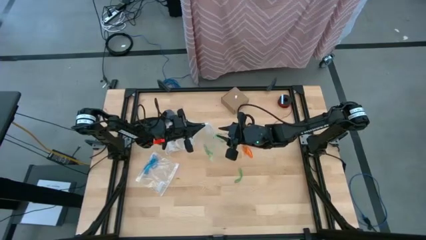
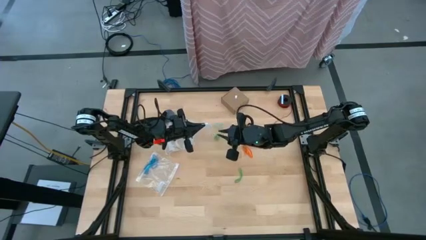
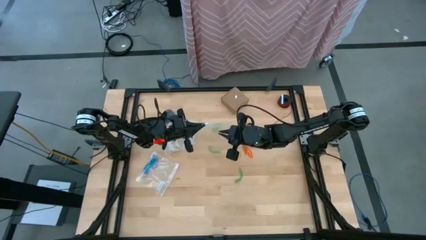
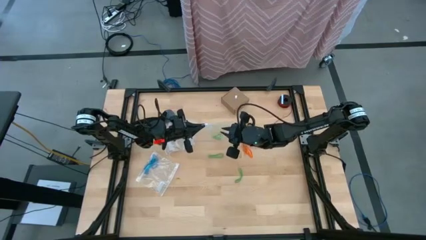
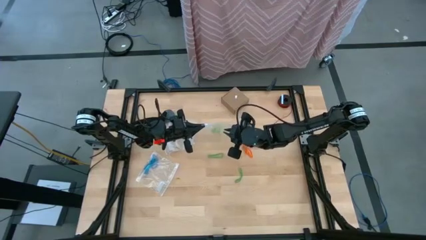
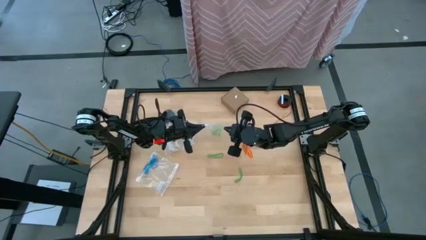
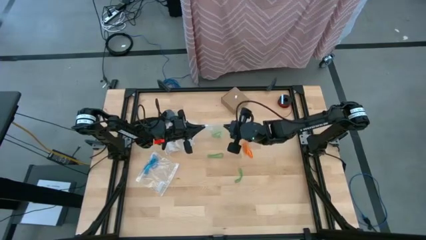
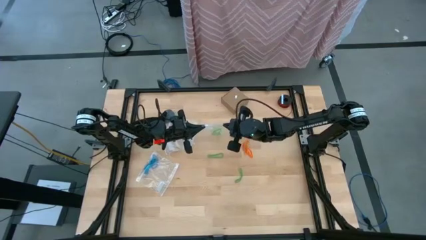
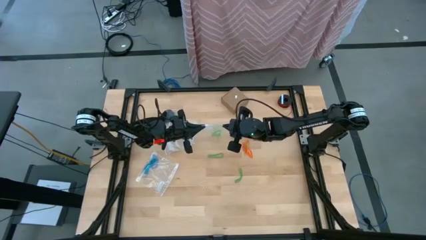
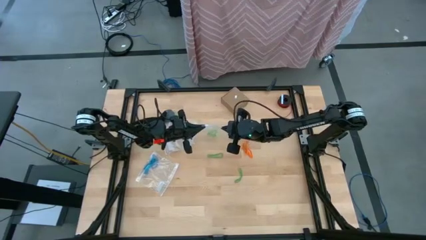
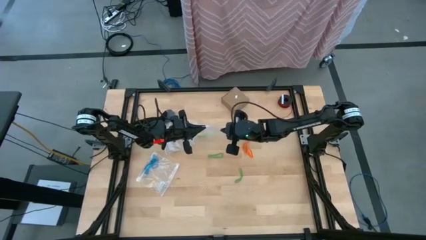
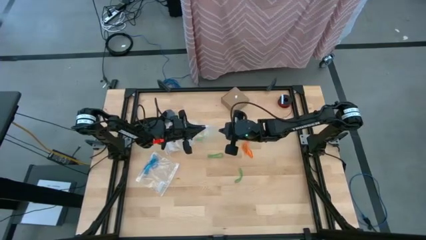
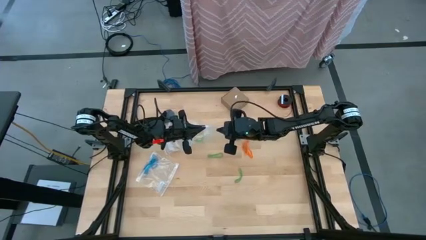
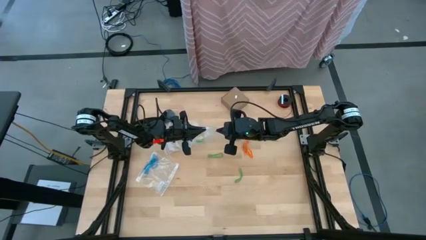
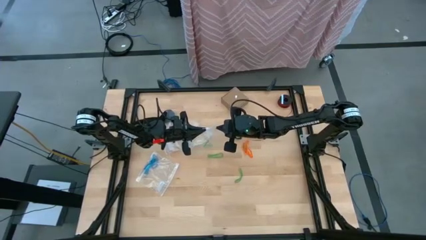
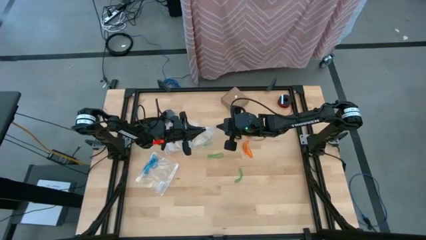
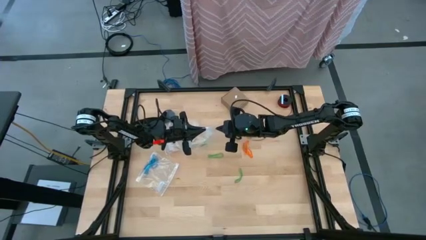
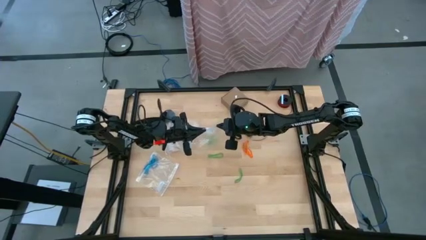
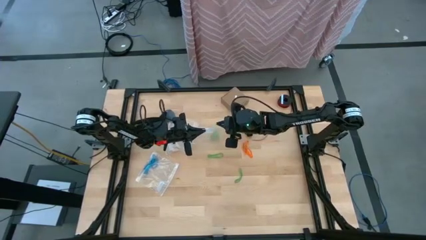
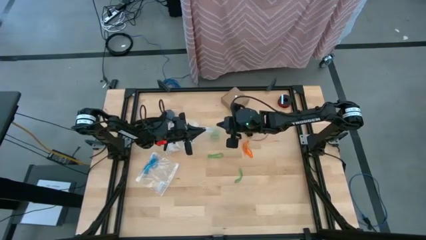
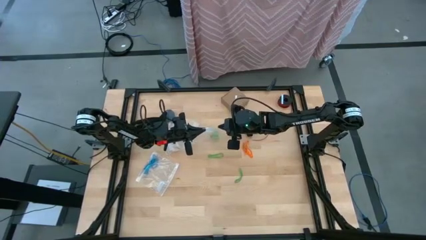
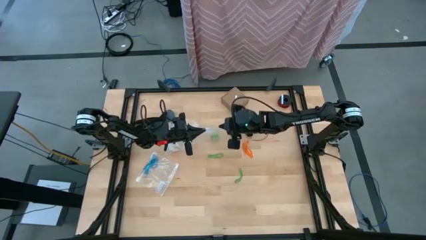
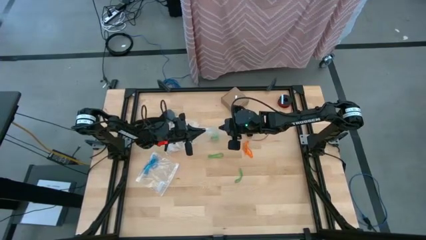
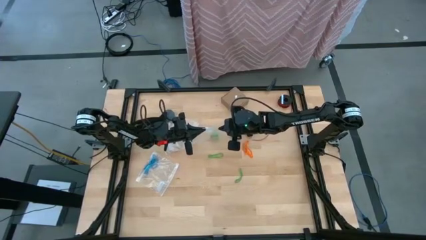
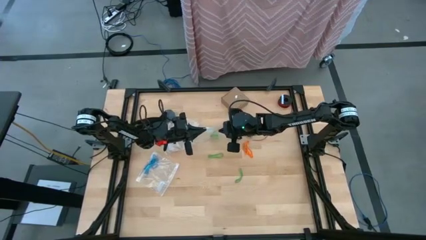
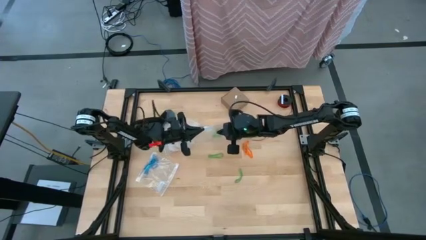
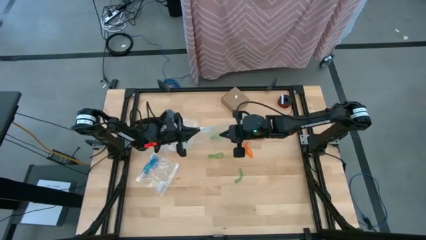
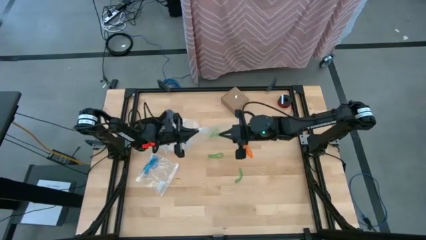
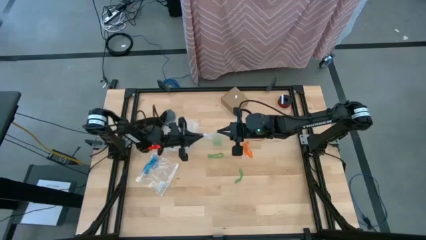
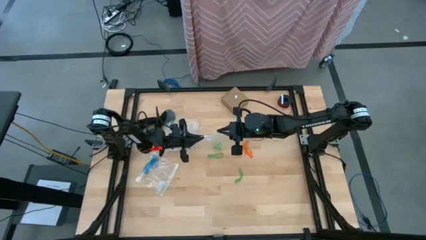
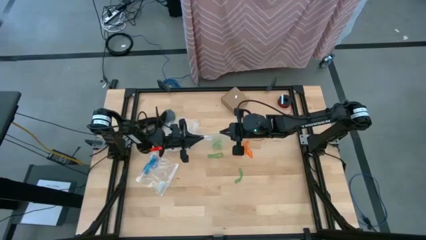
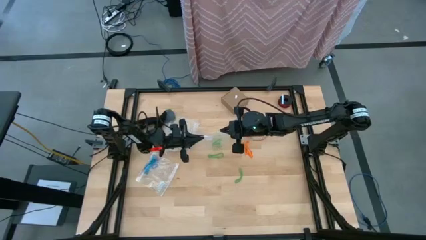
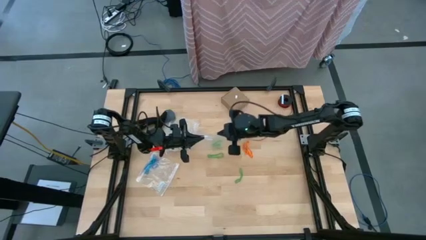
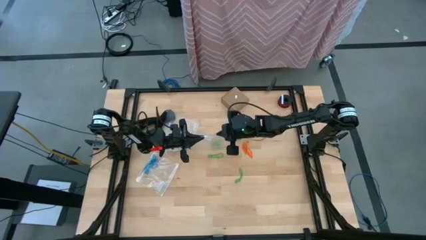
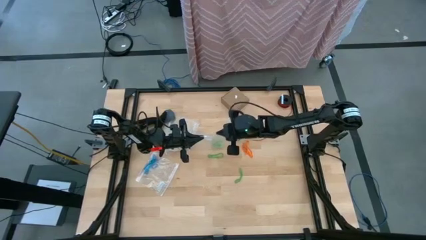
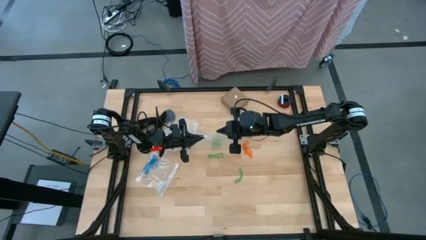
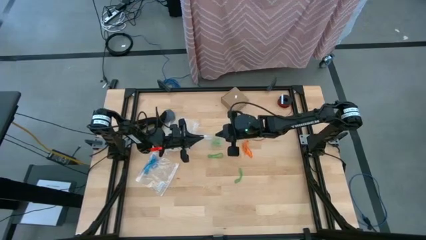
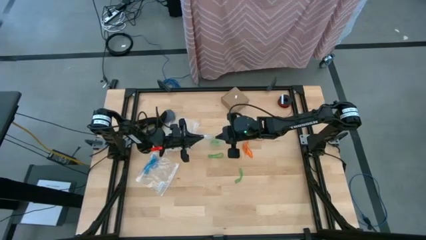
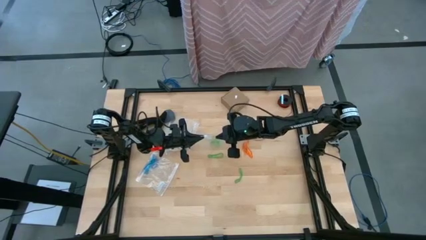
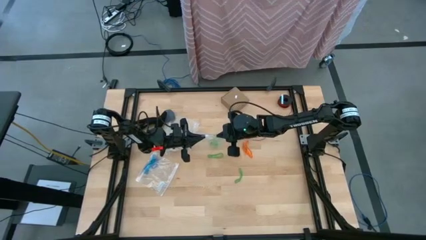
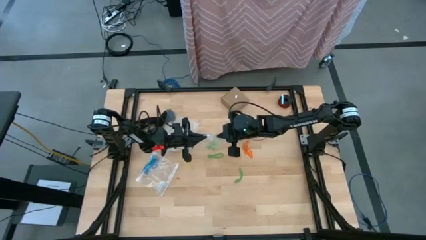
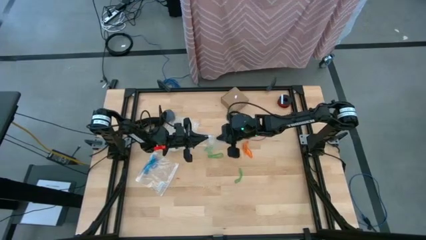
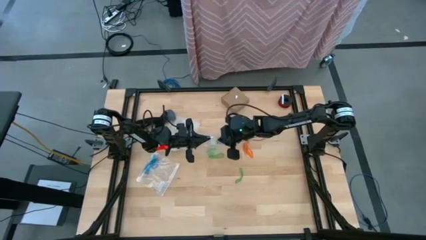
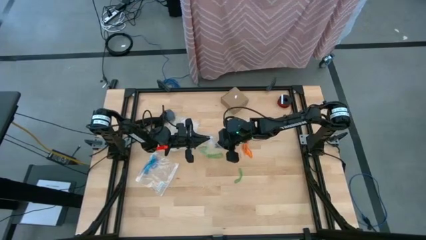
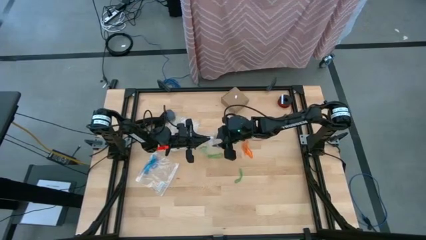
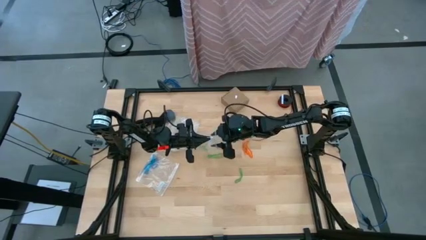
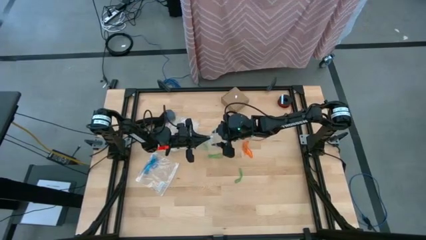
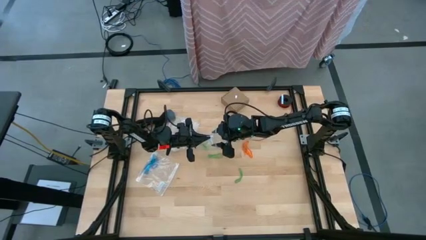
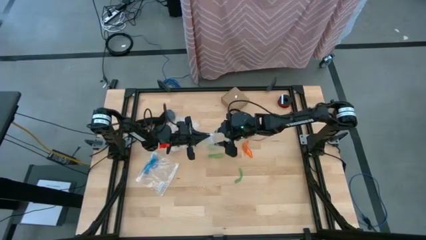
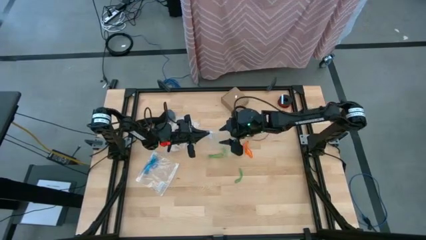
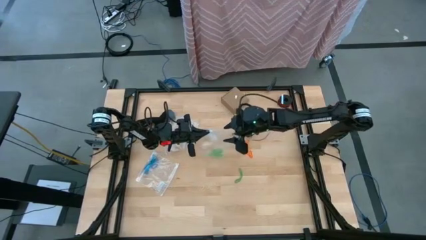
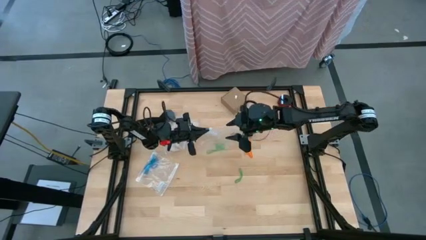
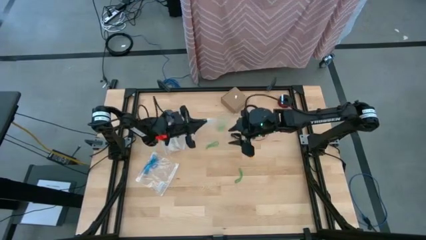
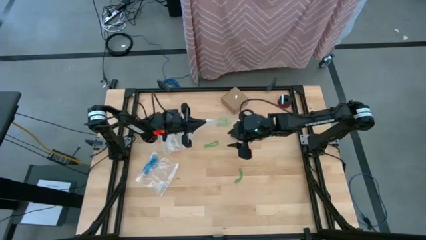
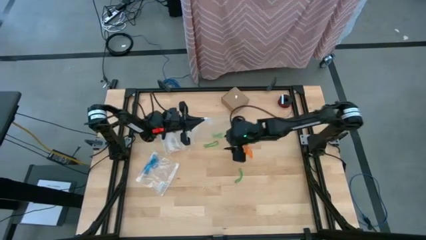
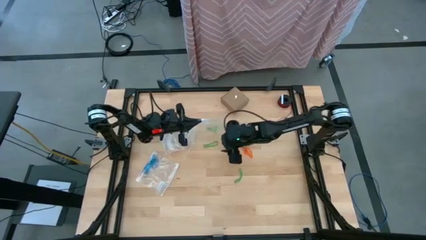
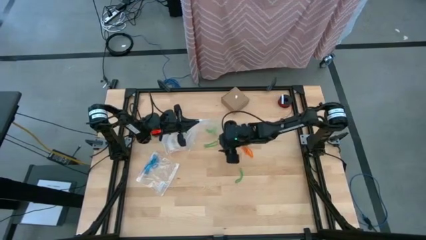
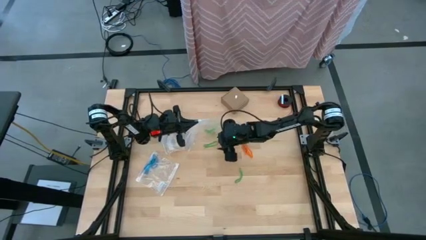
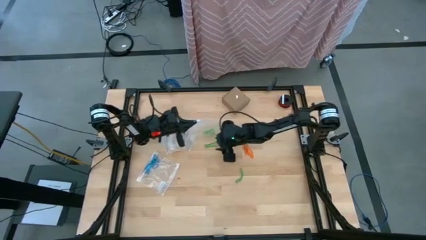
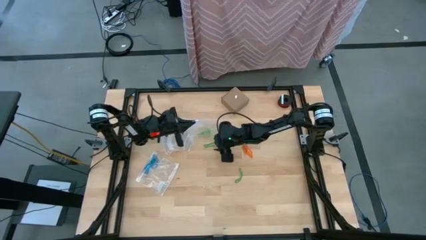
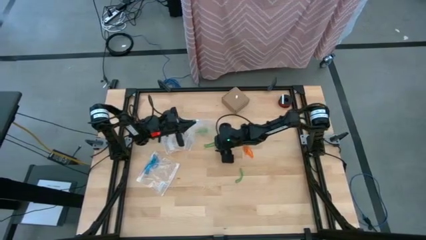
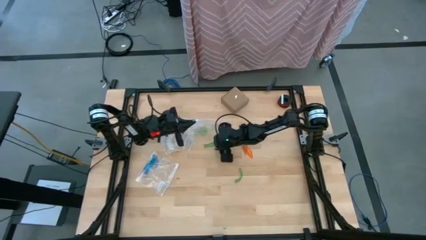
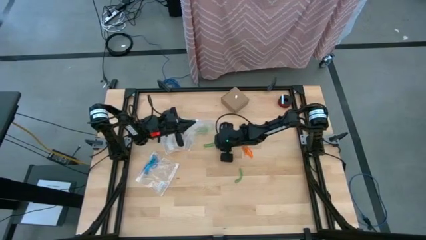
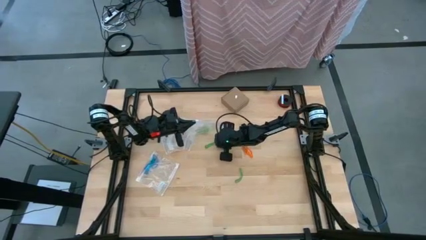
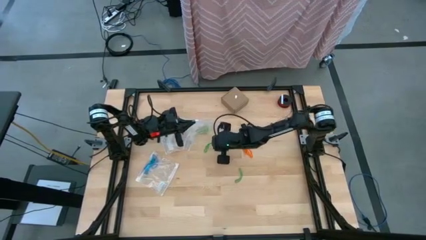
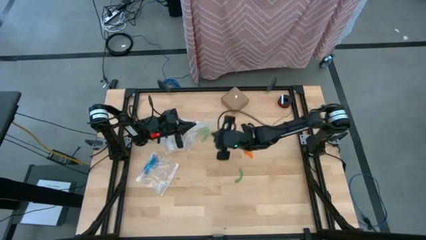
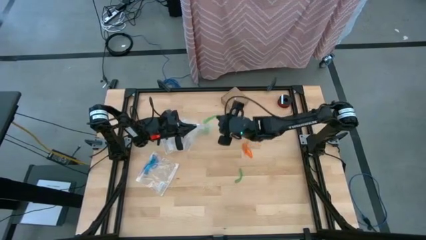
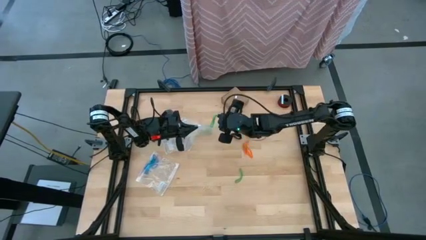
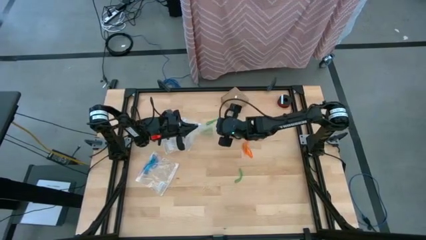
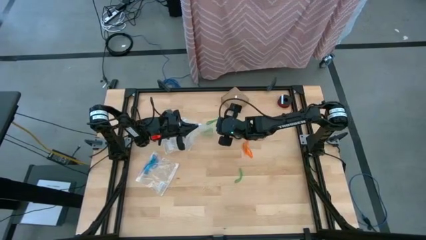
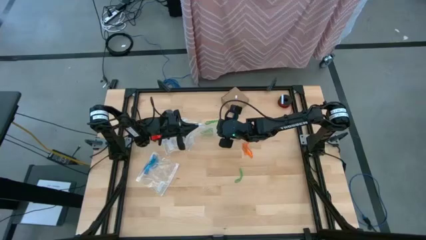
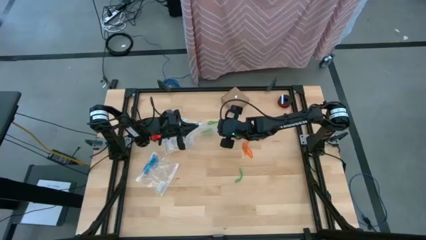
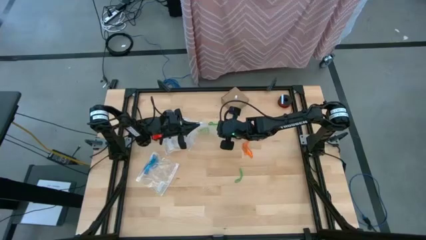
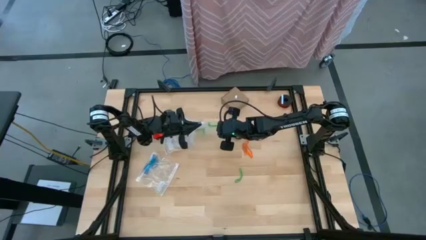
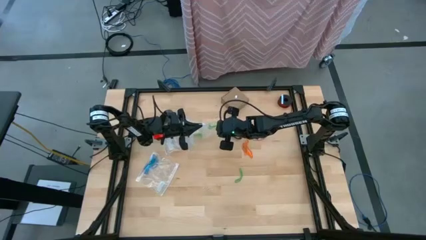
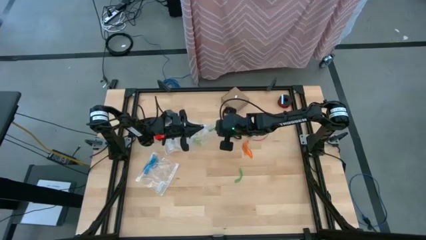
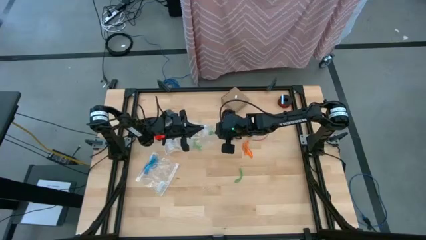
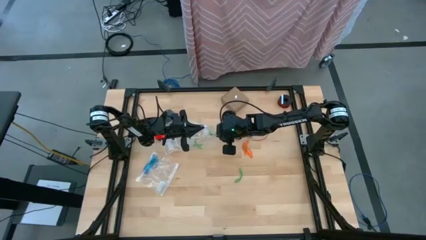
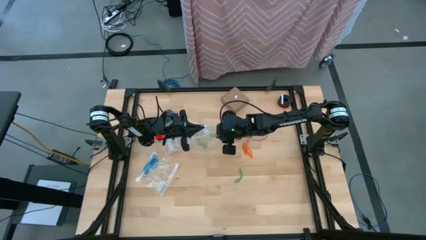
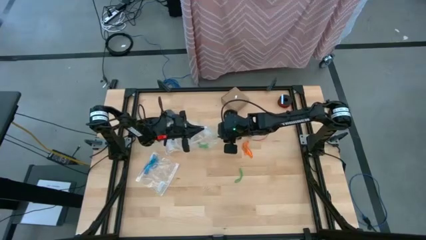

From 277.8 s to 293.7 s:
Task: Sort rubber bands
Put the green rubber band into the transparent zip bag

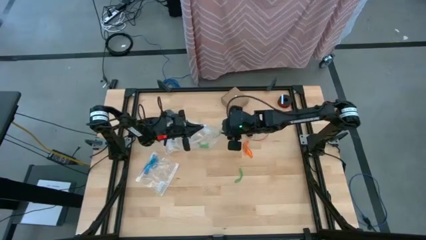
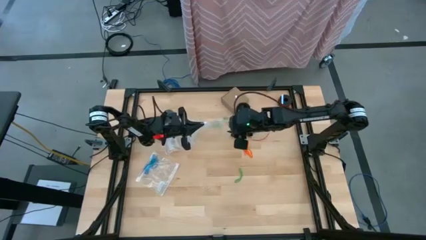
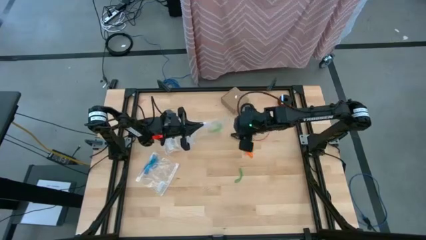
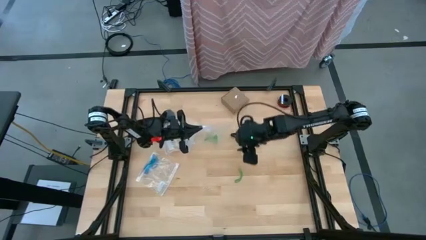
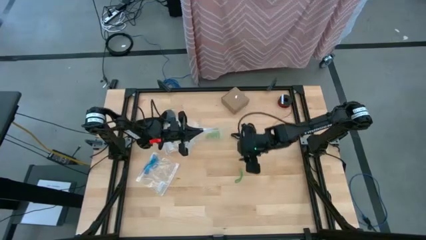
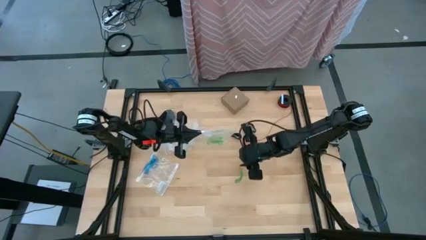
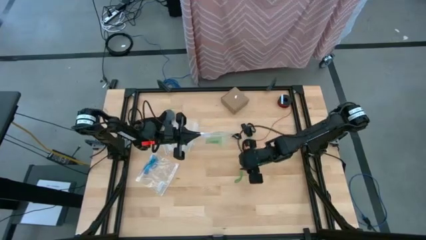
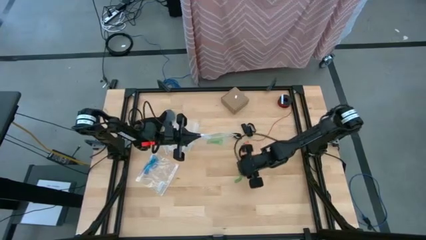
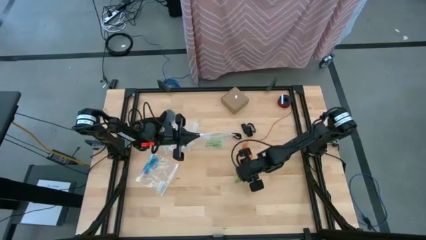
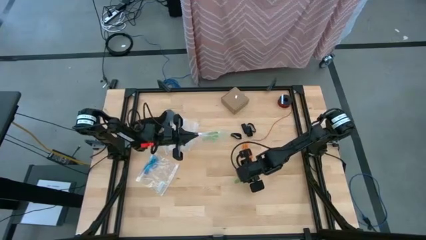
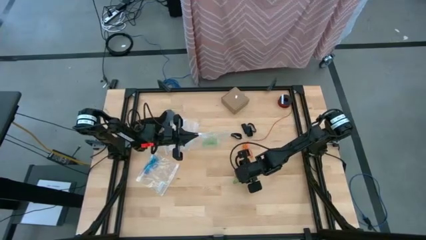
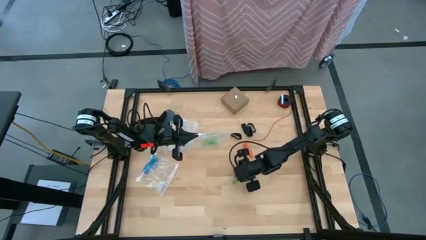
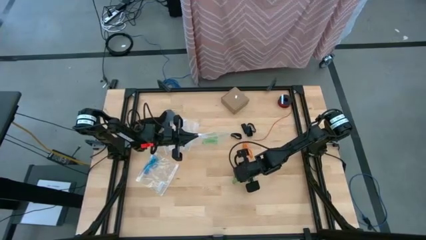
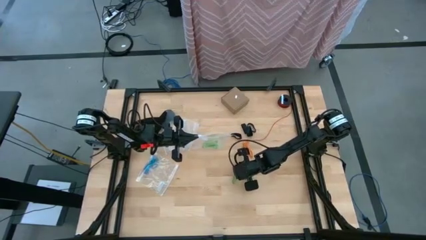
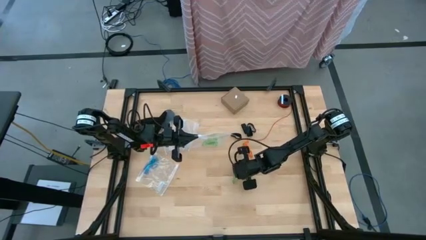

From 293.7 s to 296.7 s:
Put the green rubber band into the transparent zip bag
